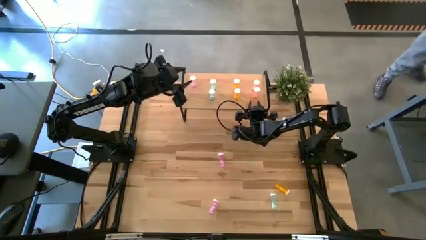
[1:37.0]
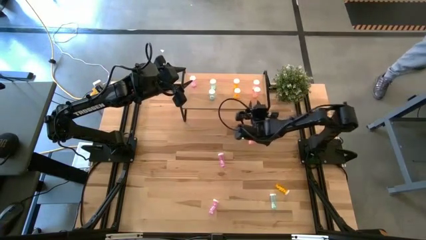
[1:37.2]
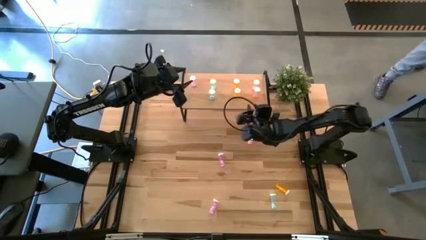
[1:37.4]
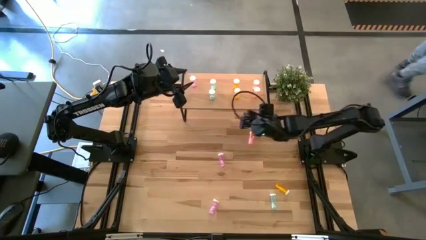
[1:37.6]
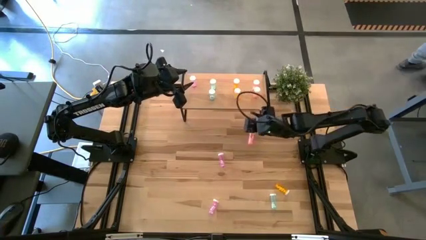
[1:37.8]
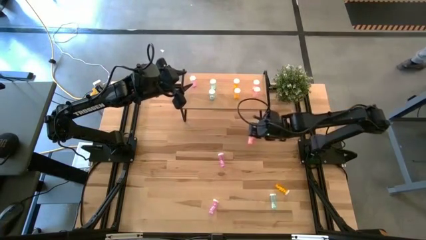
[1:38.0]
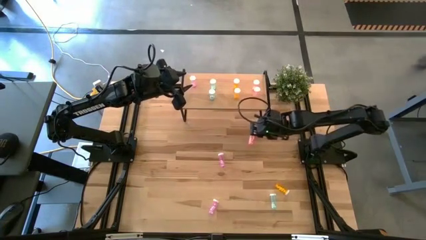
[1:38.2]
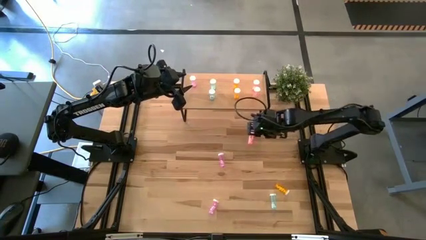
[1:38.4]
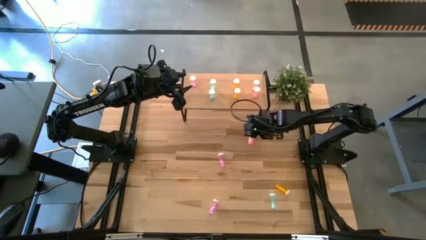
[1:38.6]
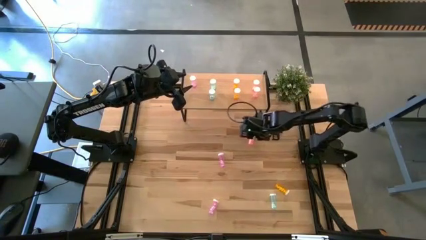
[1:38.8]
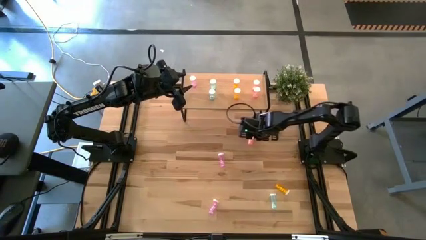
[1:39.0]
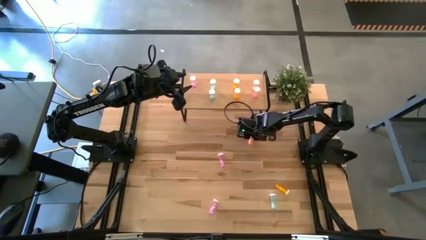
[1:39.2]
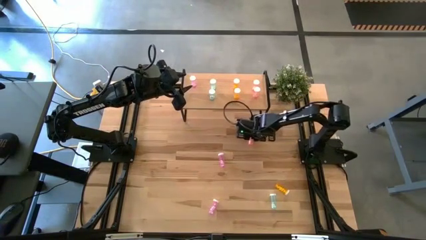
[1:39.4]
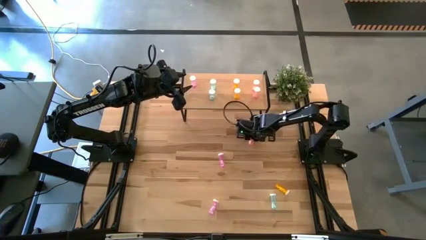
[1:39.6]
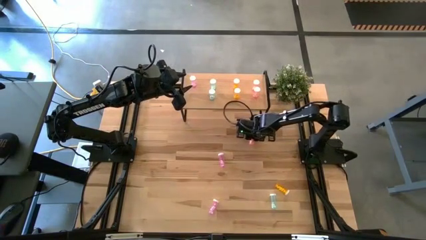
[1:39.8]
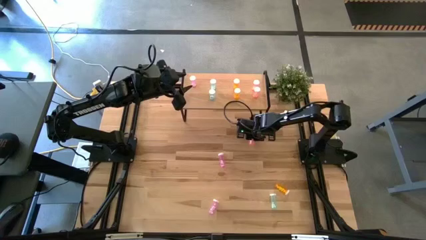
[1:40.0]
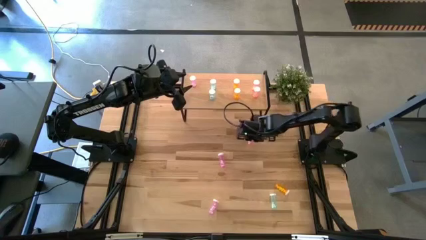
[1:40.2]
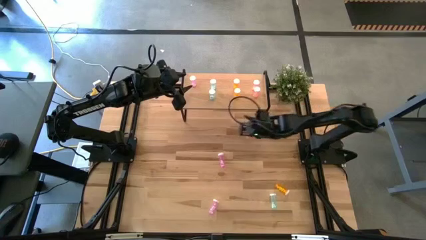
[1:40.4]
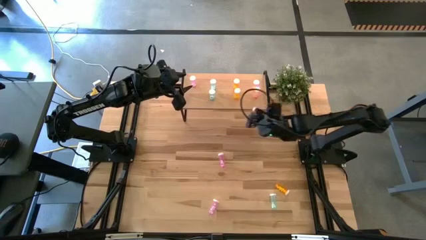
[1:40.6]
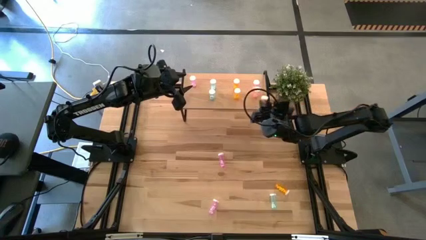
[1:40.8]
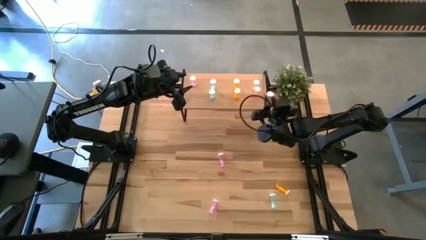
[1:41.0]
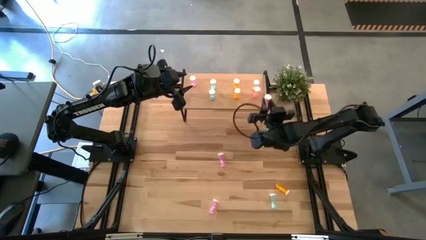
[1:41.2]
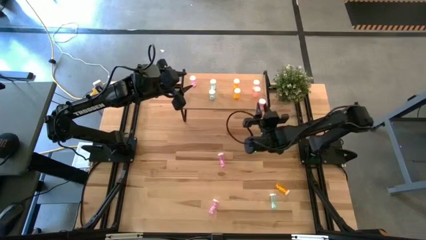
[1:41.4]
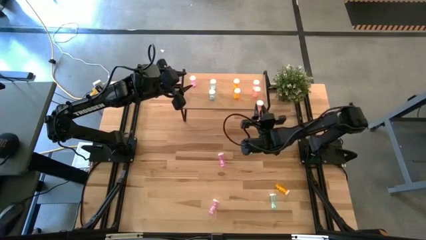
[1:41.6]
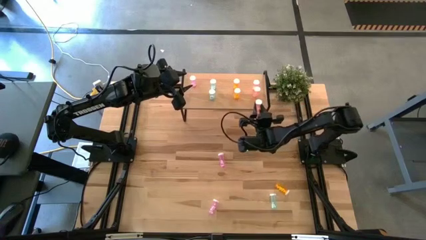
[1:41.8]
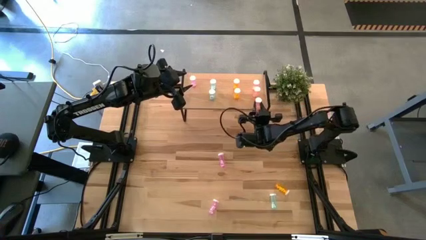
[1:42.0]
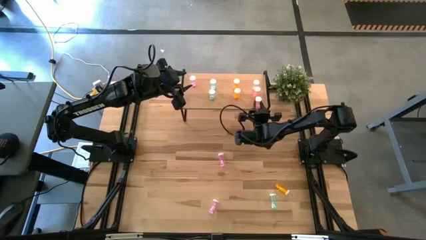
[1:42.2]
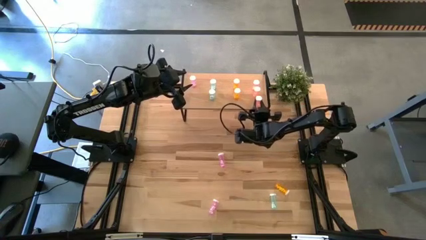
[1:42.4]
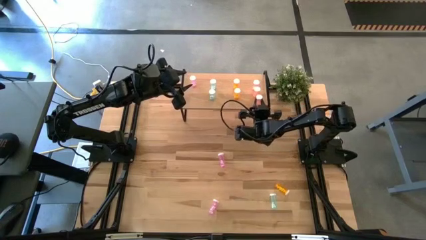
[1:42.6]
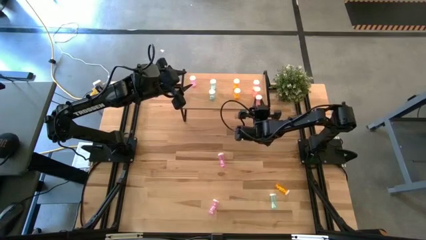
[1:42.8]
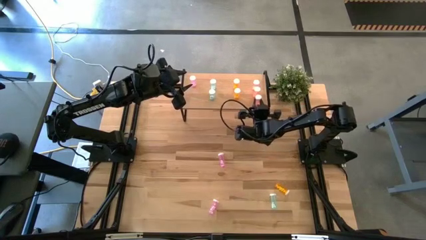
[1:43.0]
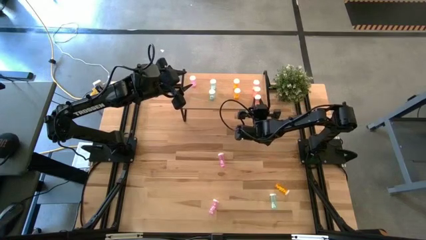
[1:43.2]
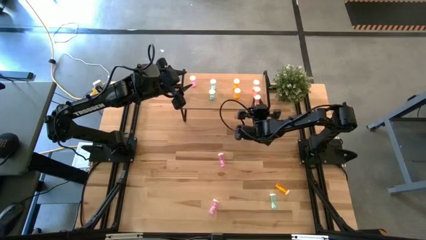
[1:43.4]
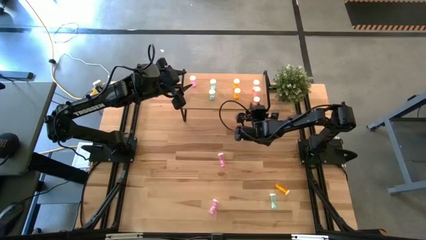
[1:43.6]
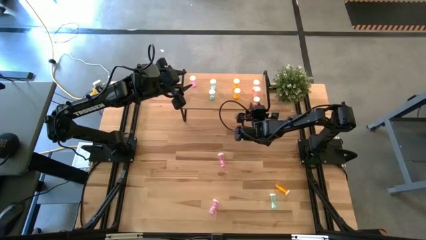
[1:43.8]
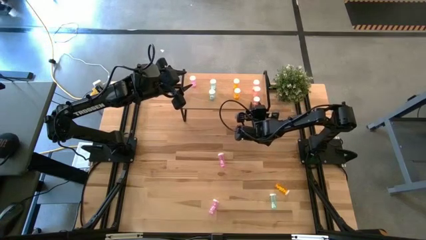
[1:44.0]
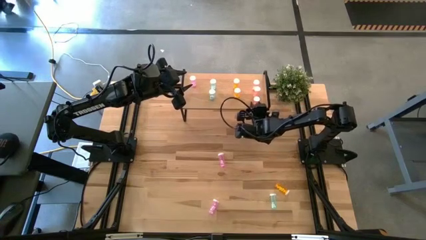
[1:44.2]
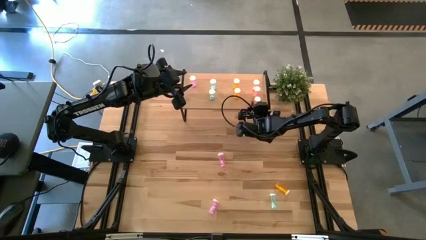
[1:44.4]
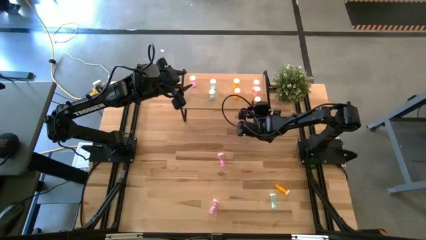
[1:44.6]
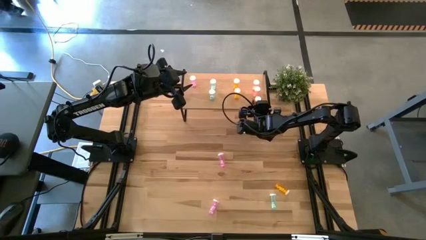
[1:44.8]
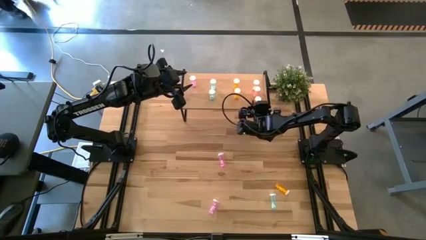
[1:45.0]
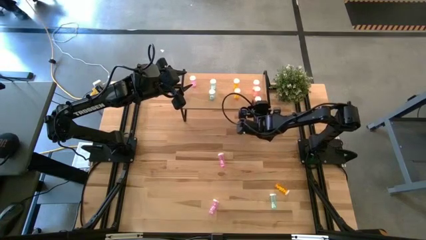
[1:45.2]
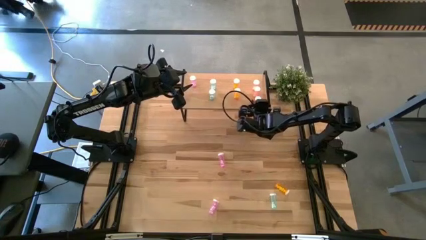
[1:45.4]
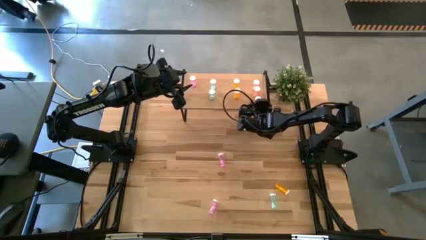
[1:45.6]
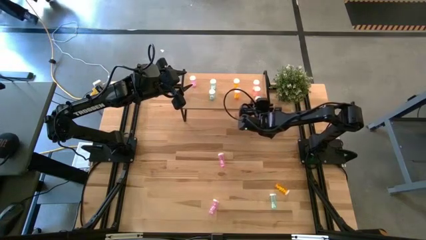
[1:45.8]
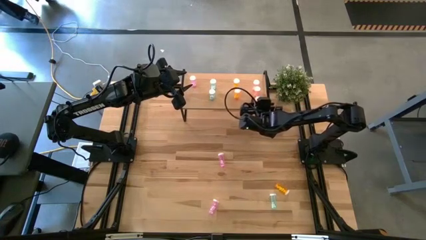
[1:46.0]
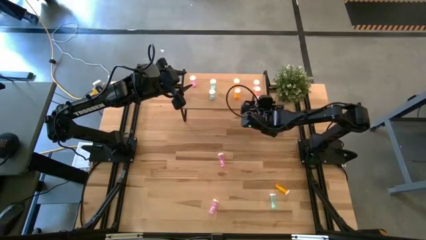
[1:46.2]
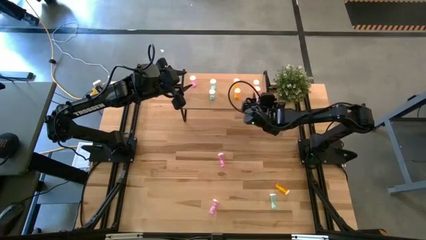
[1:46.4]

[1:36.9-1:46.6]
Task: Pick and place medicine bottles onto shelf by color
Put the pink pill bottle on the shelf aligned with the other pink pill bottles

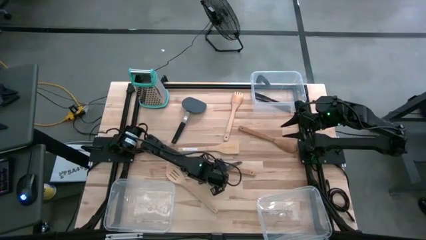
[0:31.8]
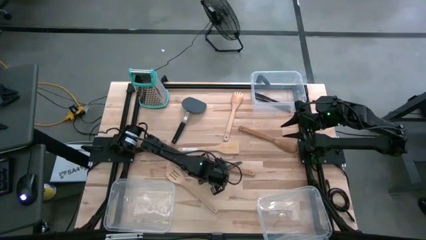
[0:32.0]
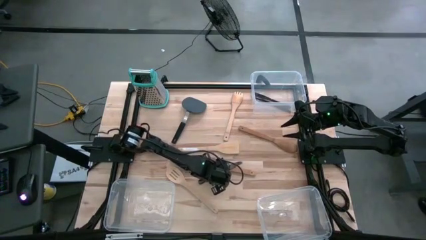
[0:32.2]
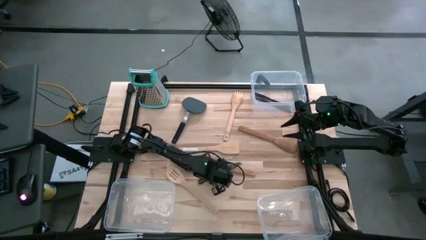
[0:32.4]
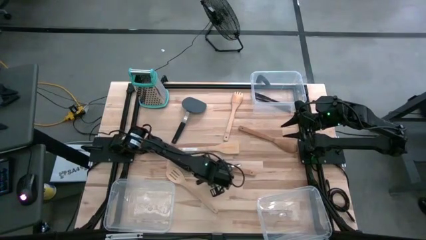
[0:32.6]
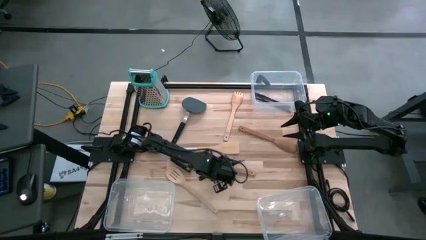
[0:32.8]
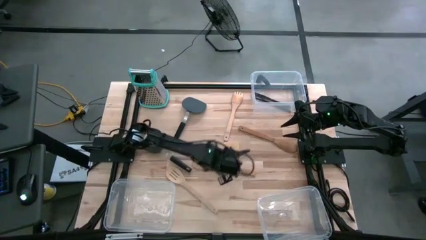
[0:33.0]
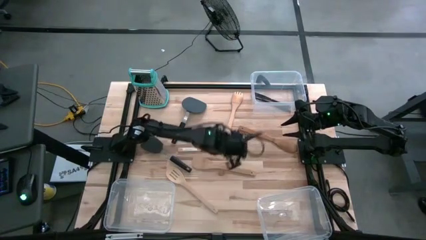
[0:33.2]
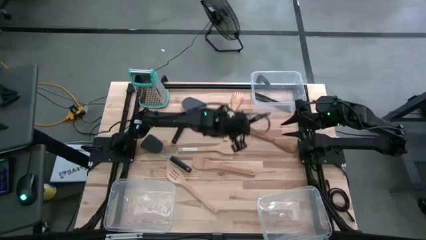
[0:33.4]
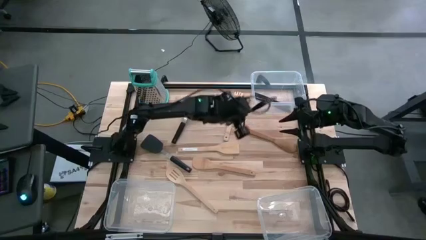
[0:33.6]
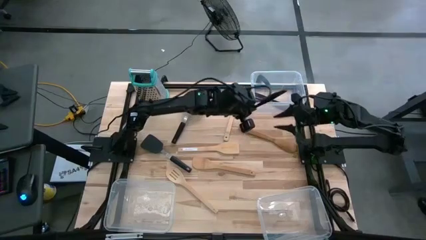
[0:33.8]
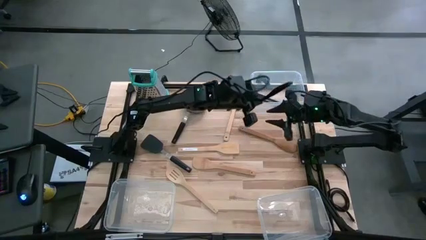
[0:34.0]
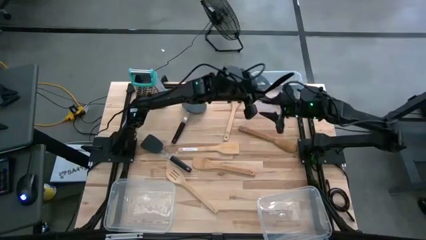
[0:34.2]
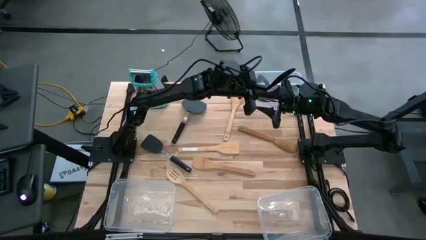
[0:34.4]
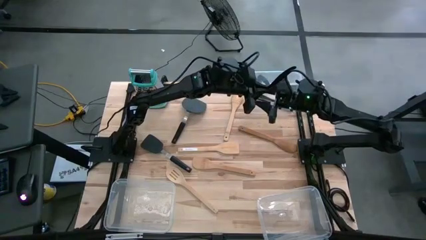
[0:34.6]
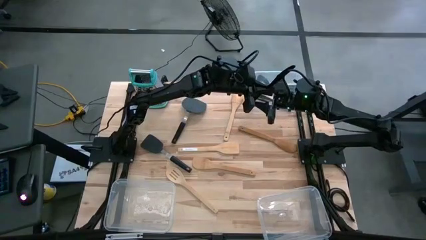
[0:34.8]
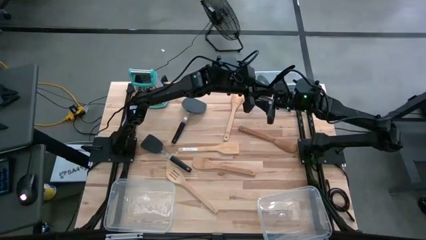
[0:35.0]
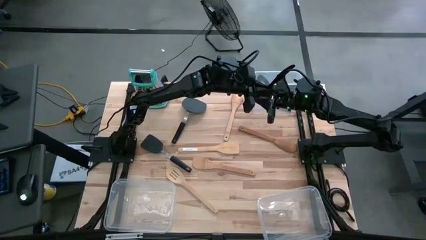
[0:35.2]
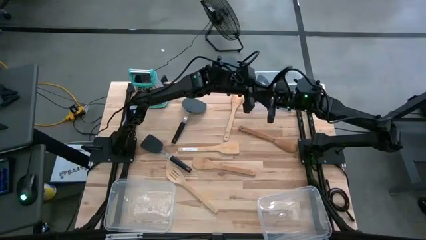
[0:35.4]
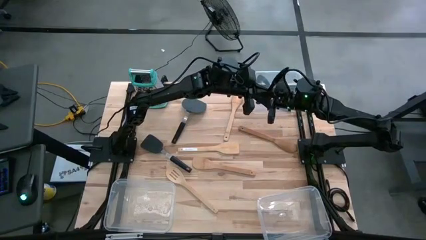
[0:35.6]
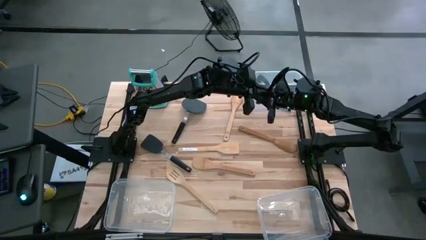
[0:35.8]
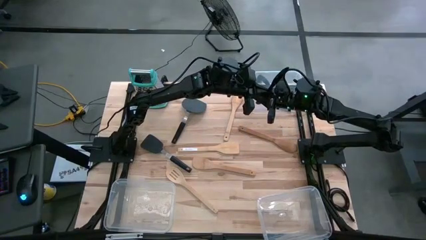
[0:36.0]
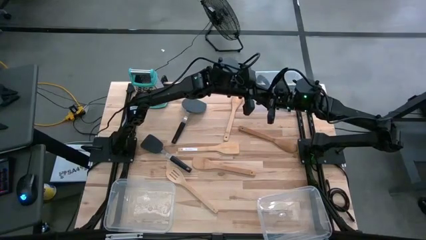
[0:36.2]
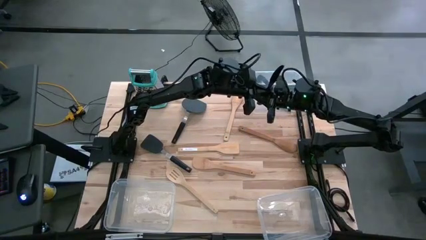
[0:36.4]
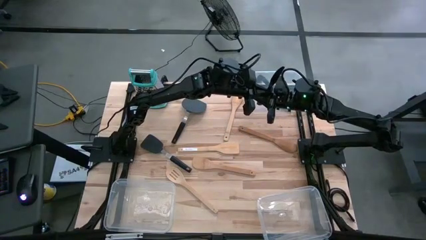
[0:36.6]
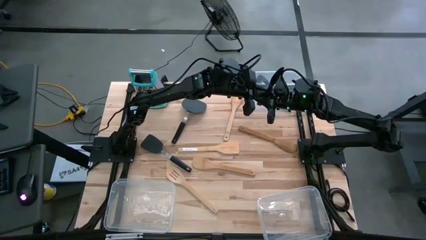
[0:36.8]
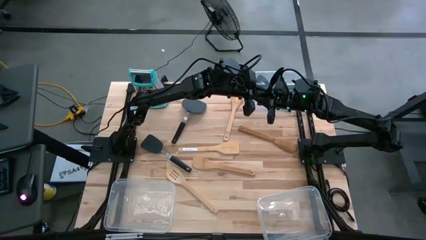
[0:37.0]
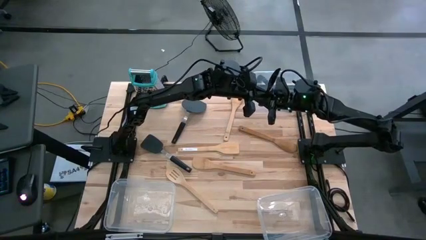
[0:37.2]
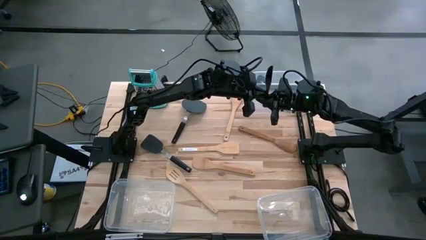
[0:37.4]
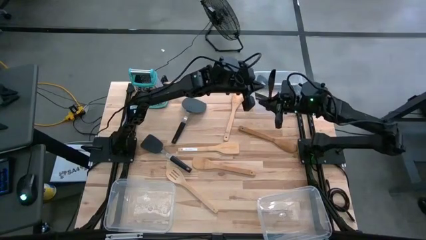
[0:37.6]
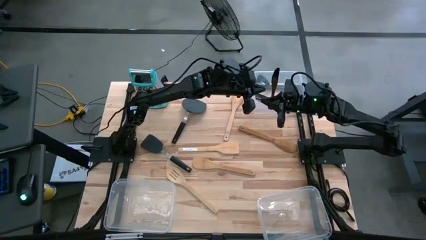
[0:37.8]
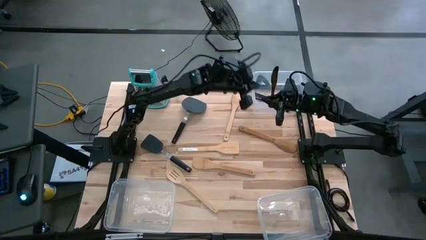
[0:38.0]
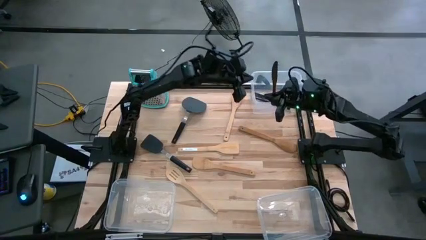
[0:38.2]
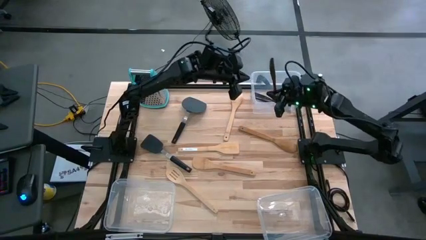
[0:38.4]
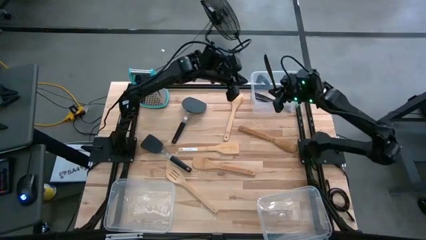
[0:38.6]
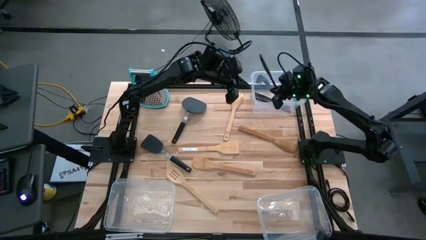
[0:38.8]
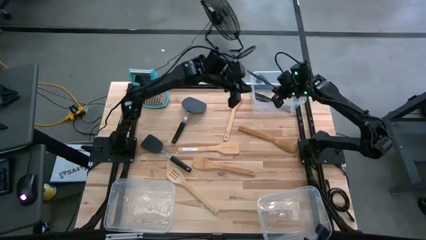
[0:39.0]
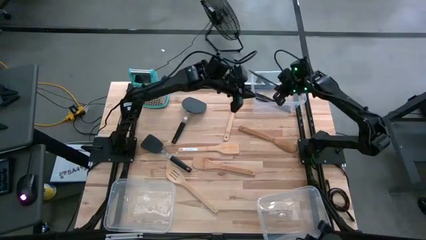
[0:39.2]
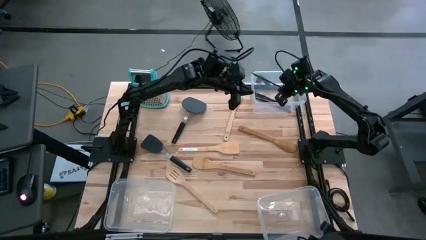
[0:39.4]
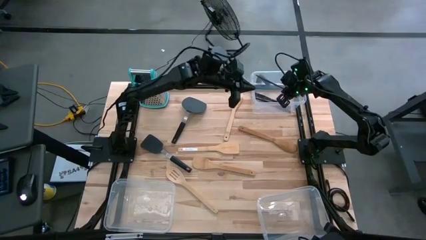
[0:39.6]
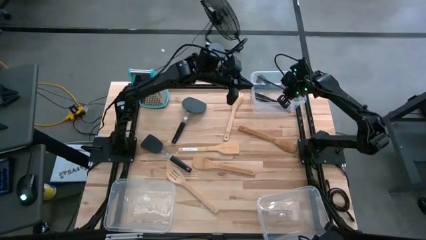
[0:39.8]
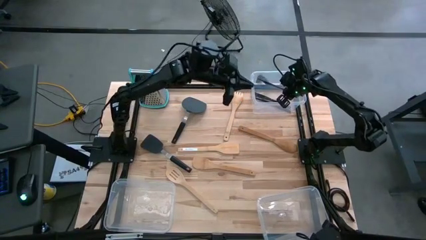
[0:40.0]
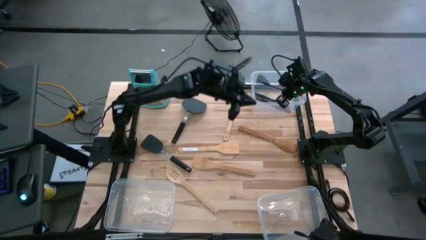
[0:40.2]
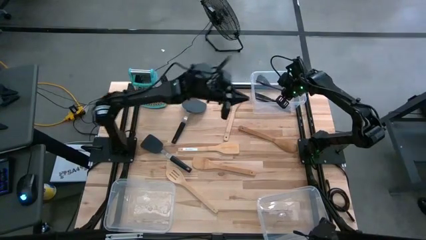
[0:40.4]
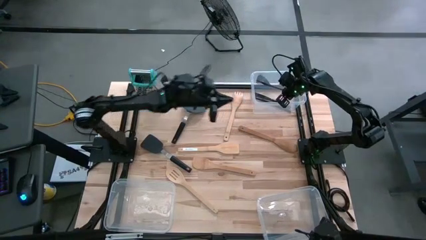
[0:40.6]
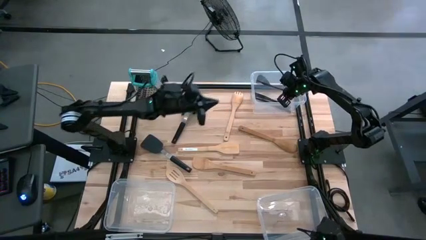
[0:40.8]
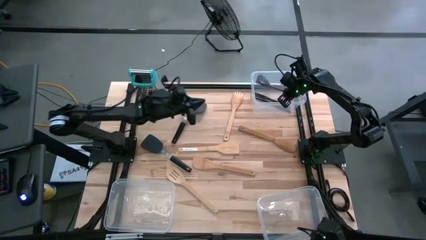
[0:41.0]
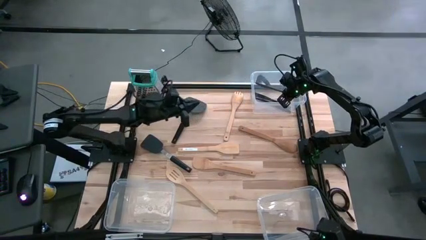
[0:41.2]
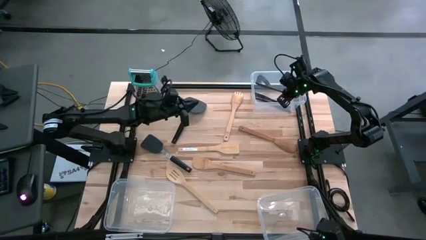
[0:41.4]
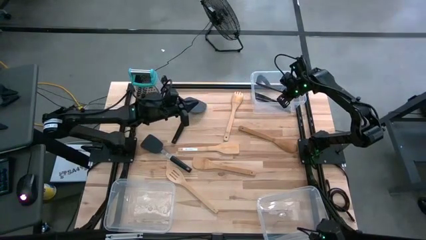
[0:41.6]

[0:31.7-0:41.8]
Task: Pick & Place Kitchen Items
Put the black knife into the transparent bin
